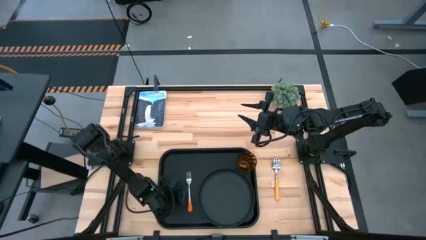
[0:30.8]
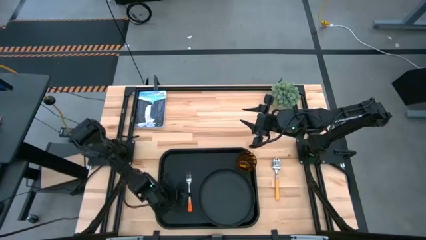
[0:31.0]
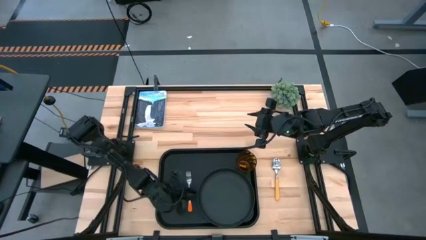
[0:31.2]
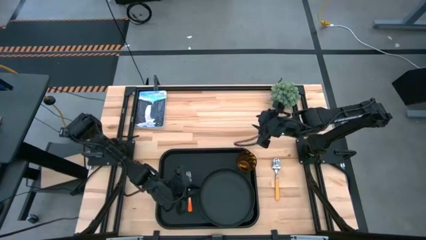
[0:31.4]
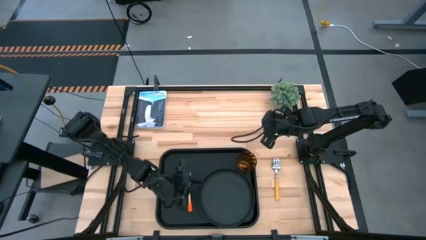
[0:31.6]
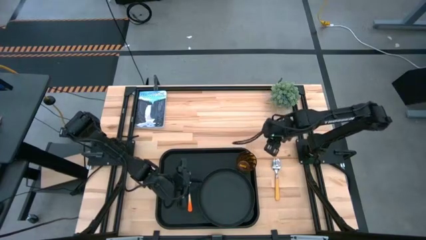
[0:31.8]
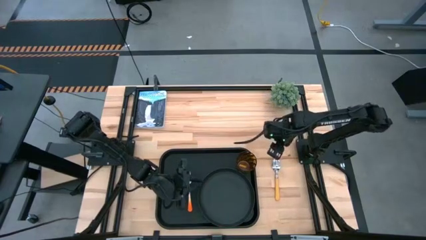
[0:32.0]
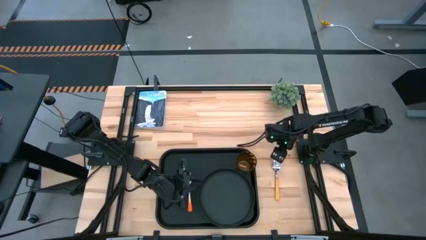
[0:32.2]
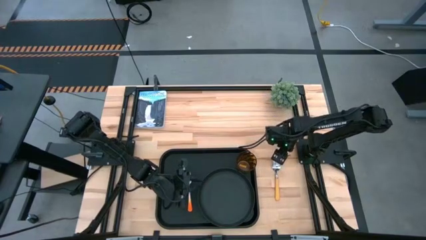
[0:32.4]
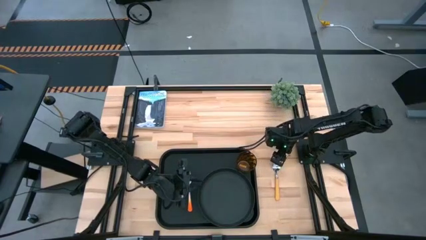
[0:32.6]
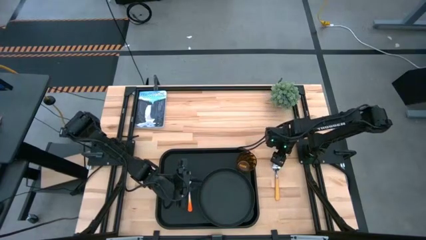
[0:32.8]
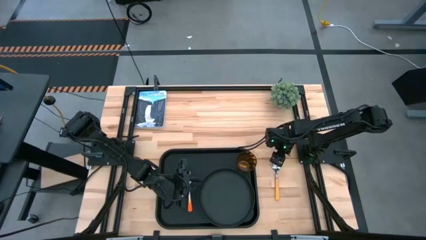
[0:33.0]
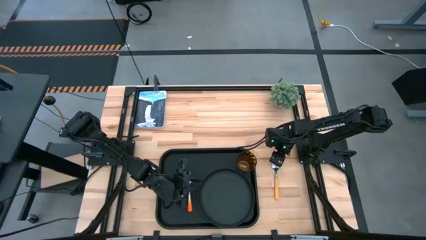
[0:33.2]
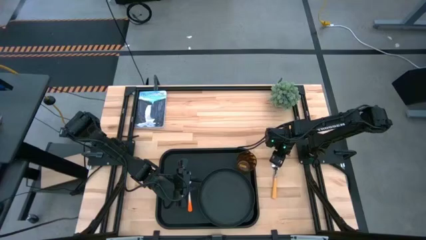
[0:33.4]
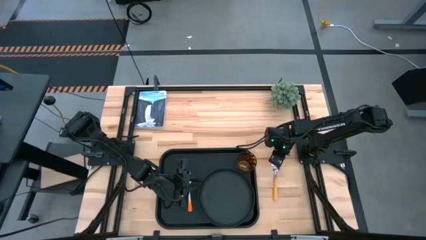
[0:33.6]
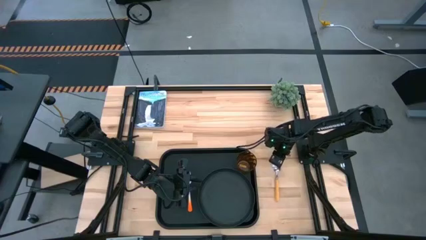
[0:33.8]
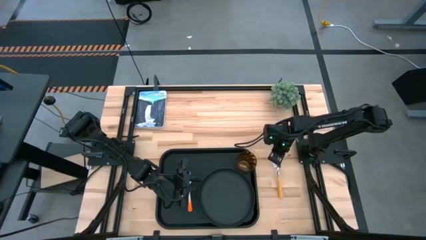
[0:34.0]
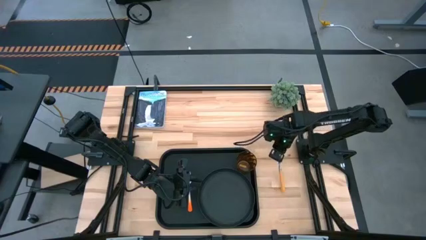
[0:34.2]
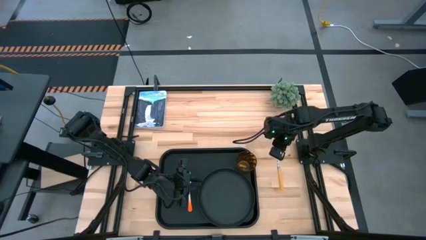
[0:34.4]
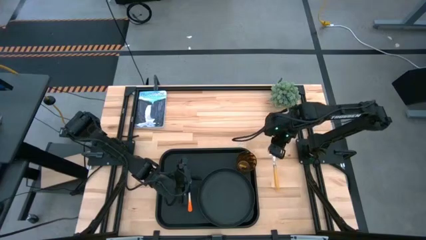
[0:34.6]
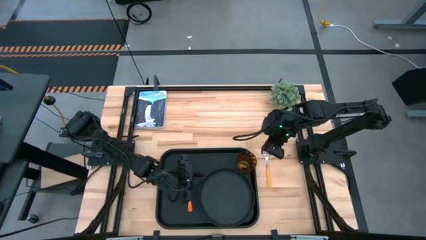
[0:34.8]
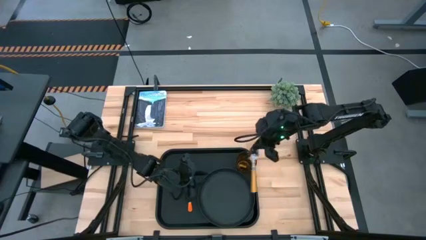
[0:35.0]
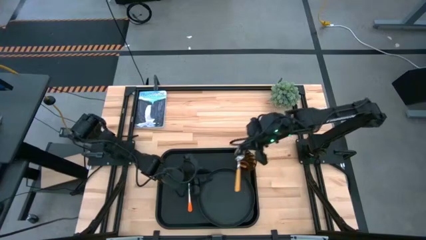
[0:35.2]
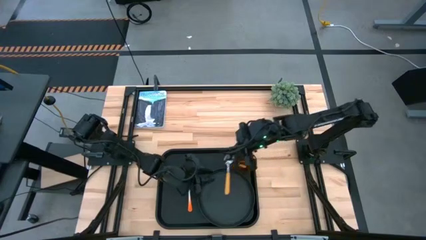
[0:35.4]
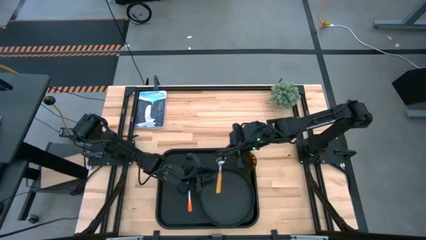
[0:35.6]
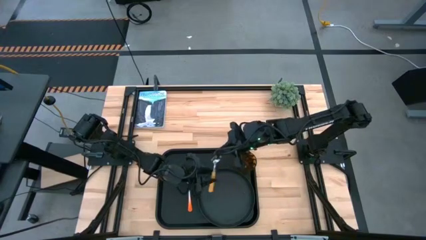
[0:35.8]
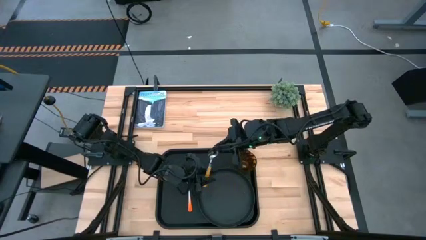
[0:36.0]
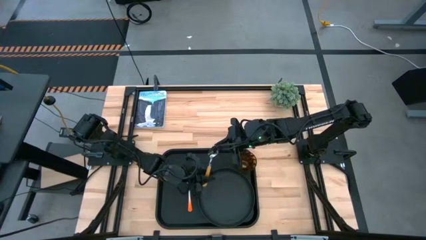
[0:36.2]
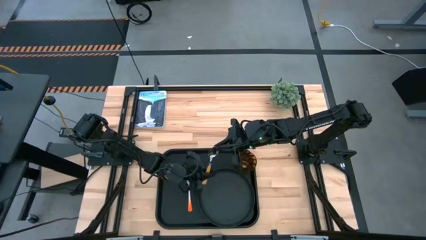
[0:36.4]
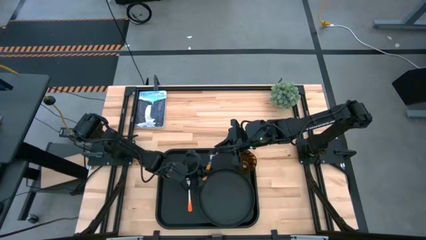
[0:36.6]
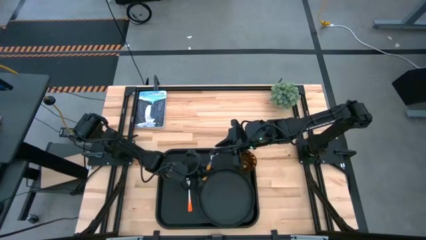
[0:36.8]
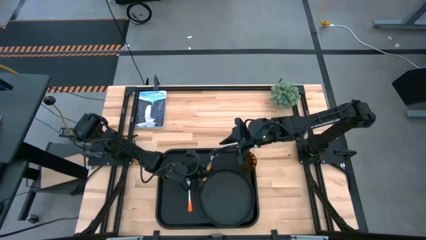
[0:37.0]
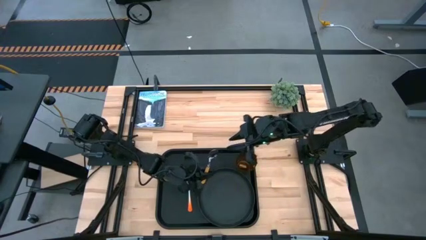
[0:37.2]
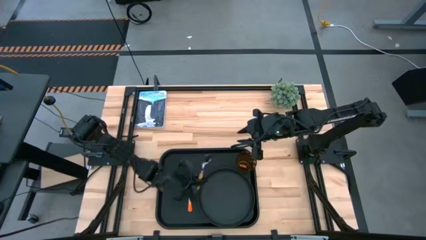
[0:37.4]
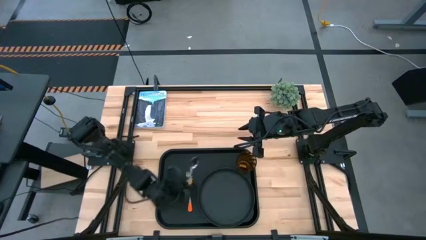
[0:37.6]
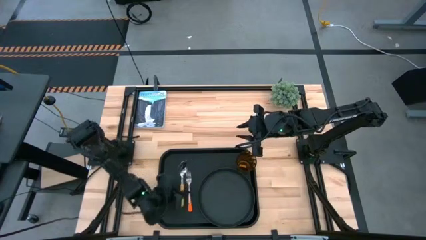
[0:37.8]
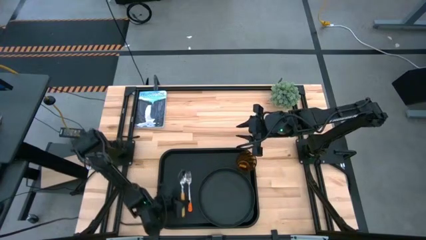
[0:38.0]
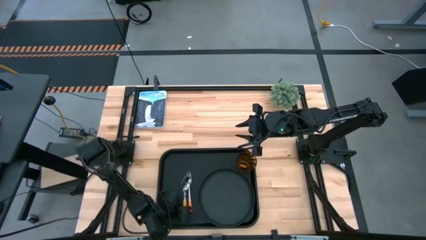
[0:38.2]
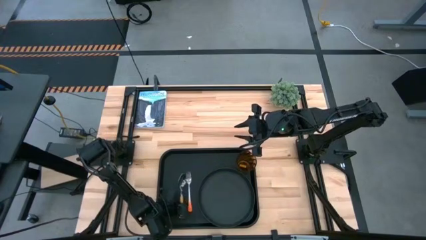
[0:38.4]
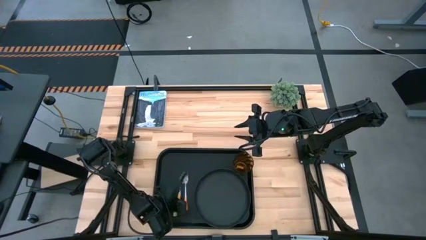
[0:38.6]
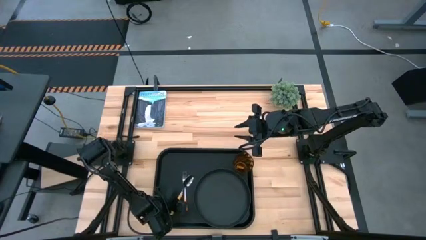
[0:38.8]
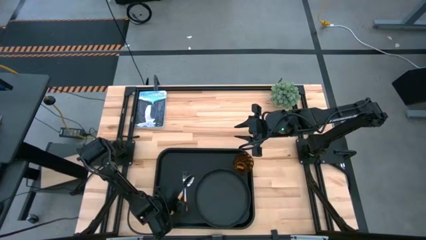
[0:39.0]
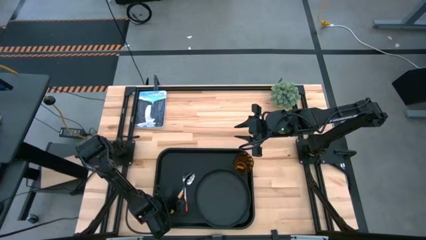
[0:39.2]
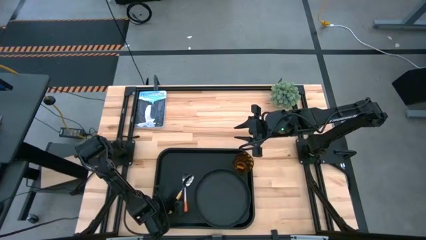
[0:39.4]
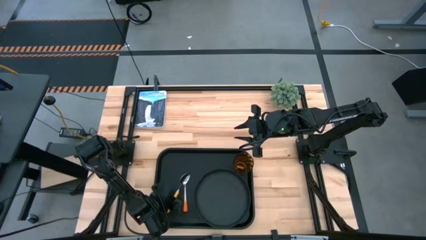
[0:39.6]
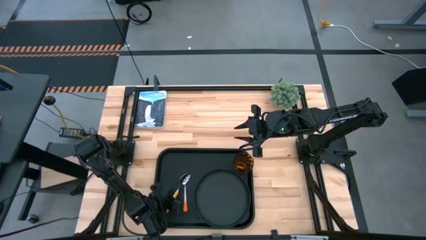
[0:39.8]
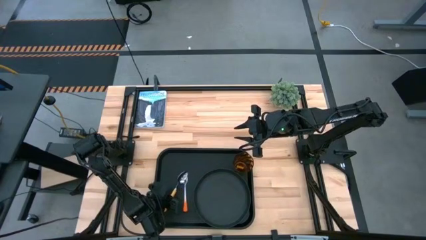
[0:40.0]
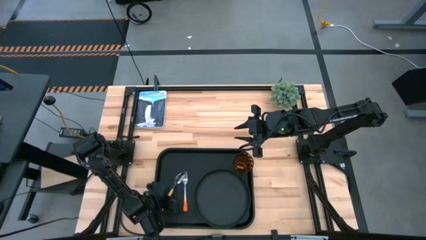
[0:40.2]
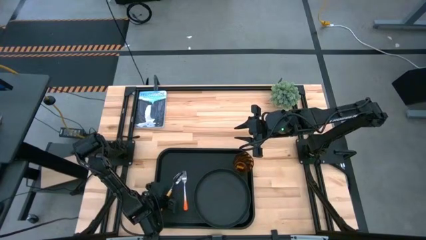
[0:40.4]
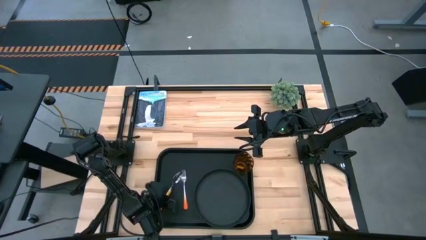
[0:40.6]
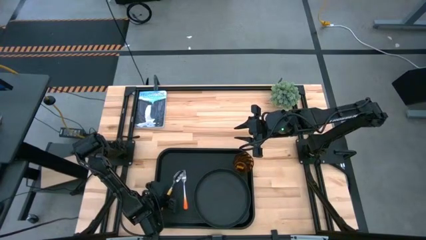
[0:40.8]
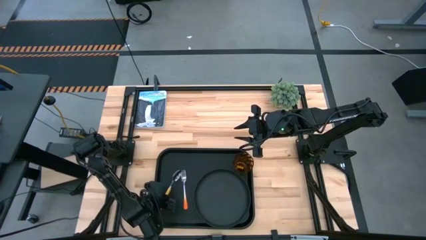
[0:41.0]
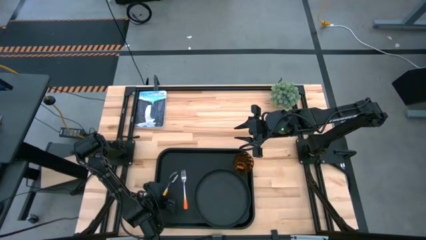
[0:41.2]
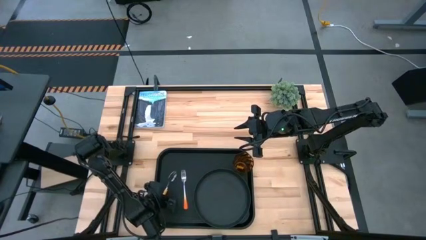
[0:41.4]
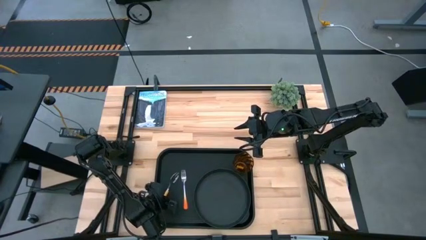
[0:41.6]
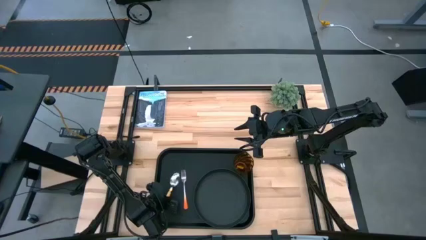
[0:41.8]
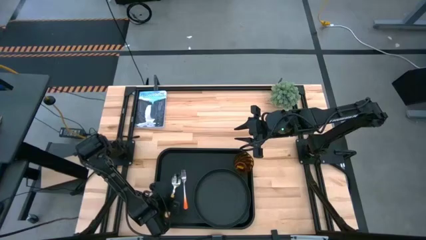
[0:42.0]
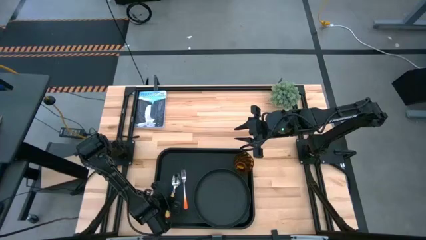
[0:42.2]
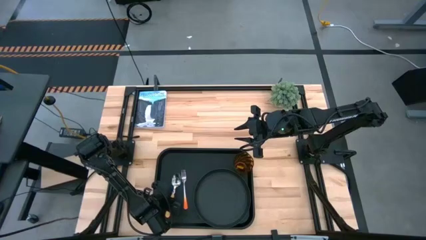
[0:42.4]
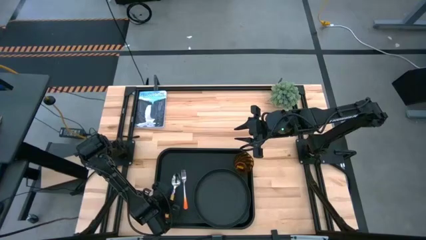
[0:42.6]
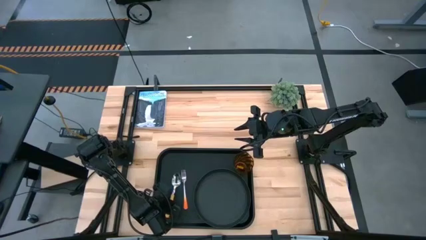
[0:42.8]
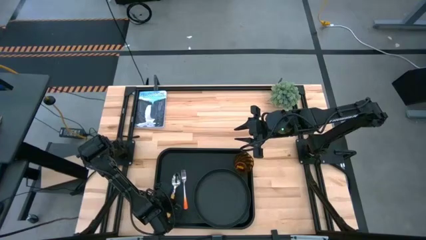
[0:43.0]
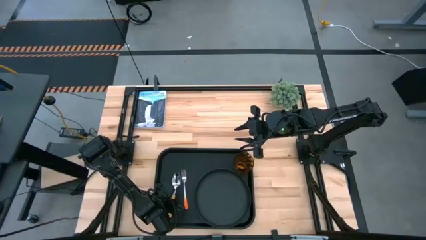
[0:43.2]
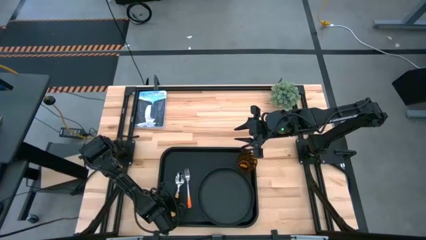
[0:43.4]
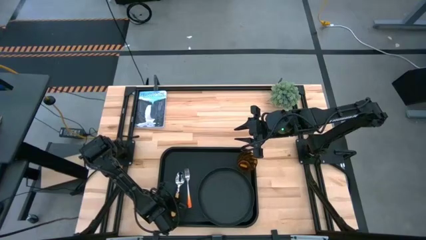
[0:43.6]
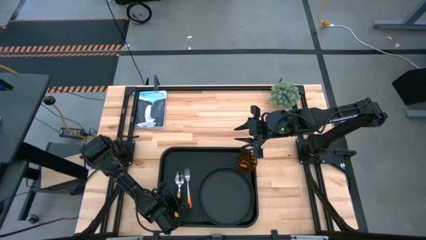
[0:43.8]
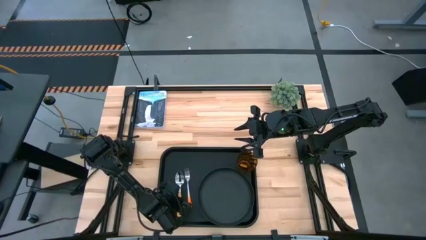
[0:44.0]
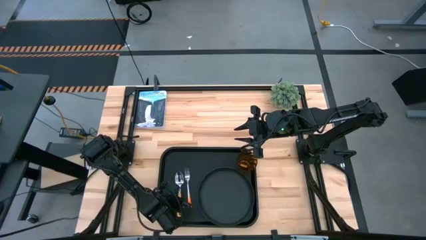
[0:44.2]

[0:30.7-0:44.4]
Task: Pick and place plate/cup/fork/spoon on tray
Put the yellow spoon on the black serving tray to the left of the orange fork

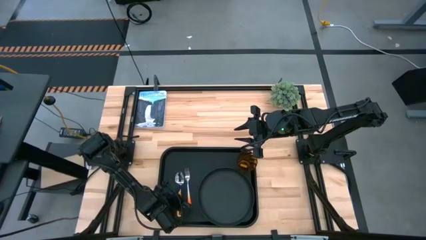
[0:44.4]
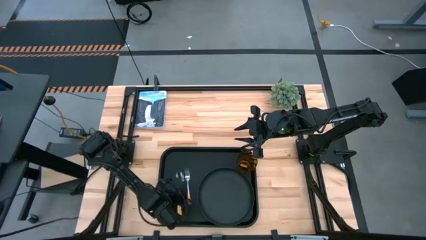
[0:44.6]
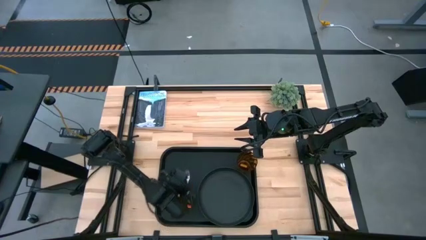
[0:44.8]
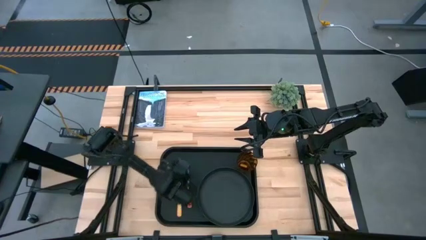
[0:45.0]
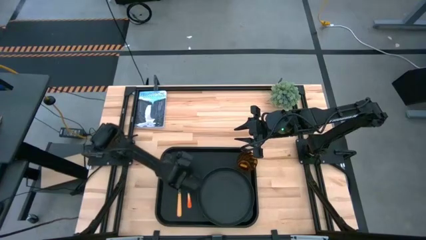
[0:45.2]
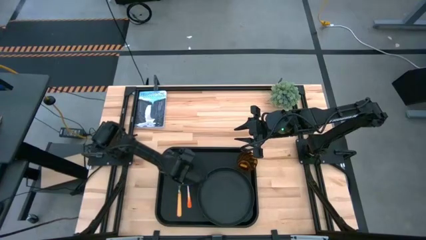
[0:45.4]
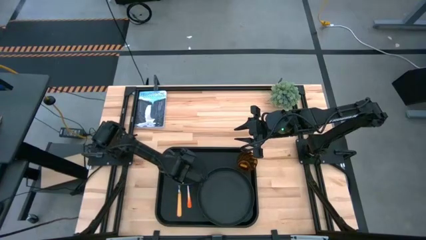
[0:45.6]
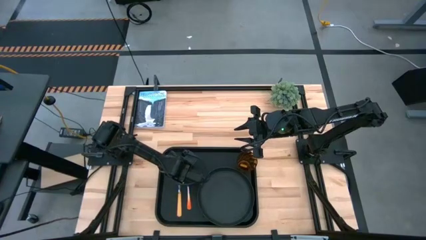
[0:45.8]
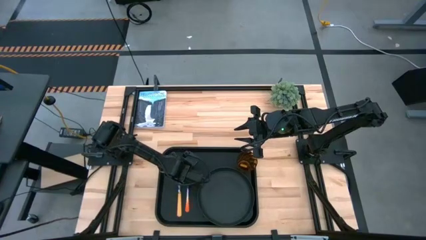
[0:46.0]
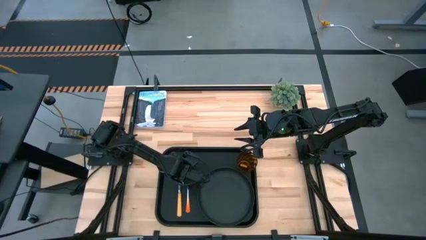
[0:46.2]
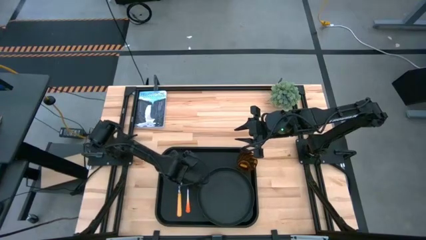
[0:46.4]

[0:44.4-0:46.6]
Adjust the orange fork on the black serving tray
